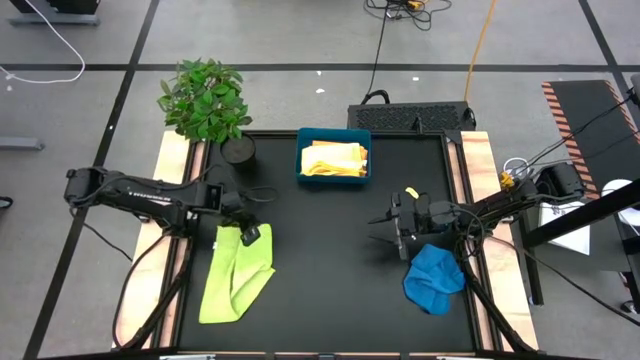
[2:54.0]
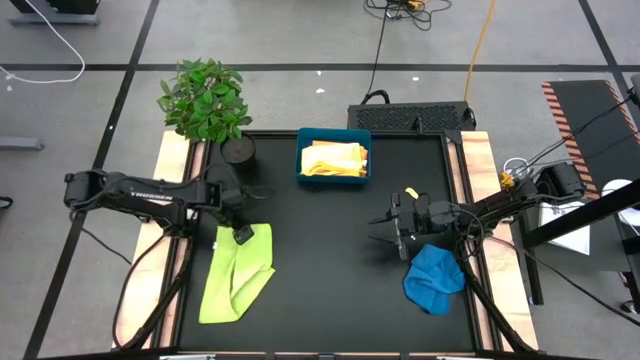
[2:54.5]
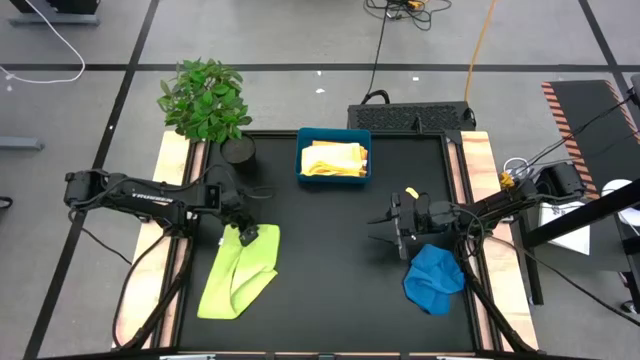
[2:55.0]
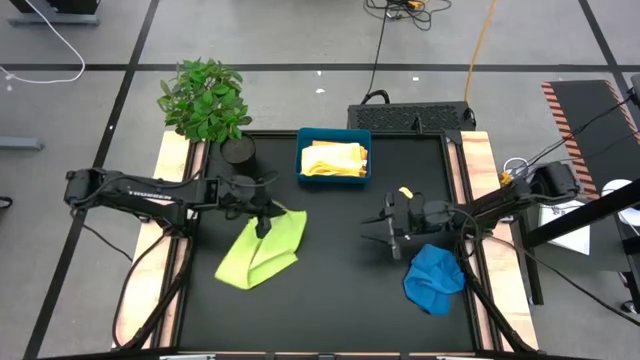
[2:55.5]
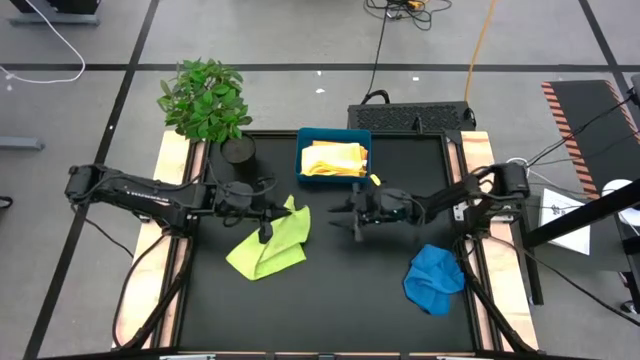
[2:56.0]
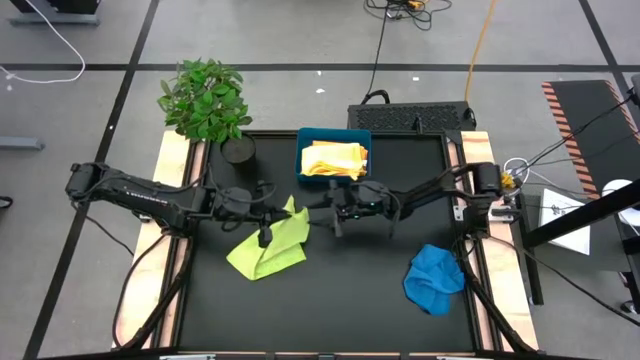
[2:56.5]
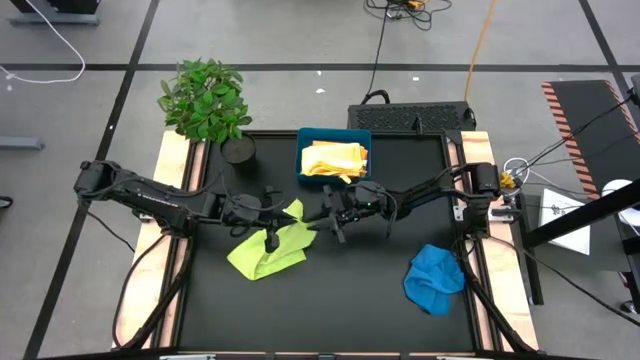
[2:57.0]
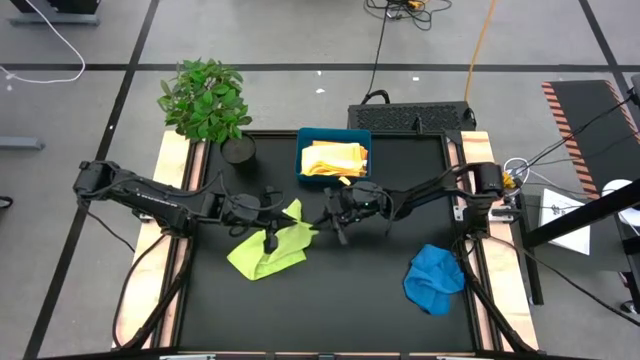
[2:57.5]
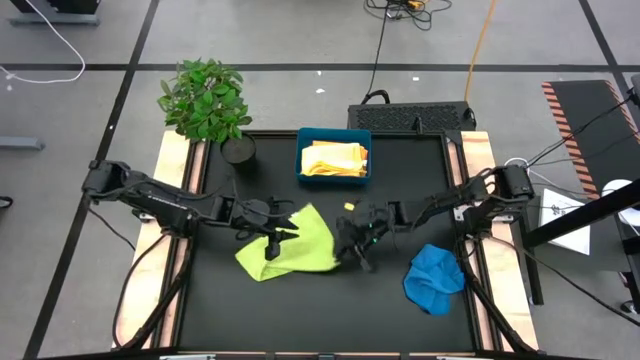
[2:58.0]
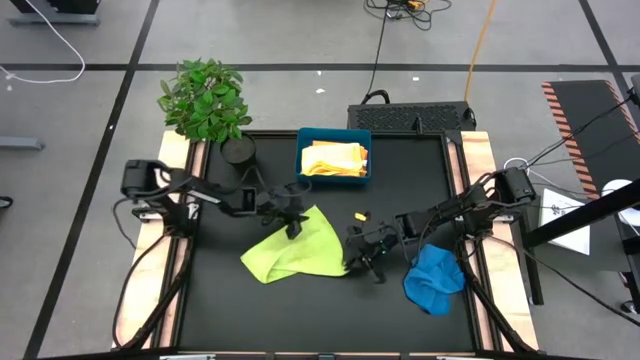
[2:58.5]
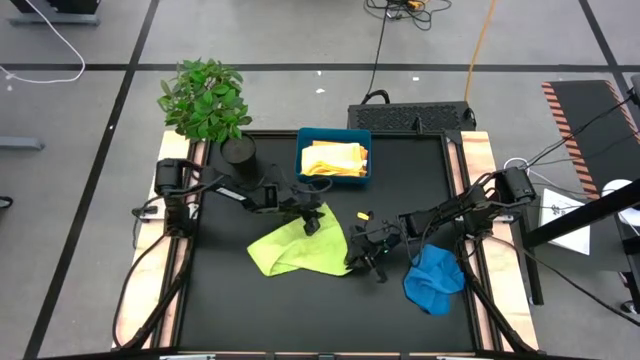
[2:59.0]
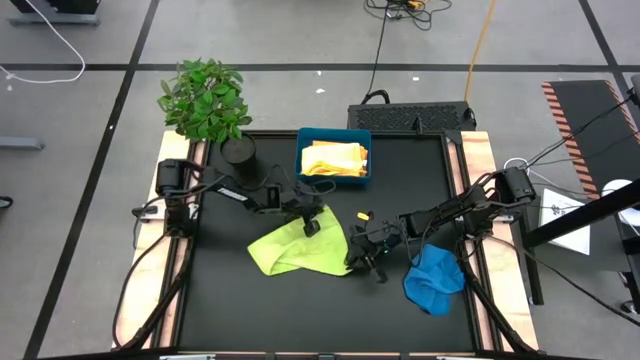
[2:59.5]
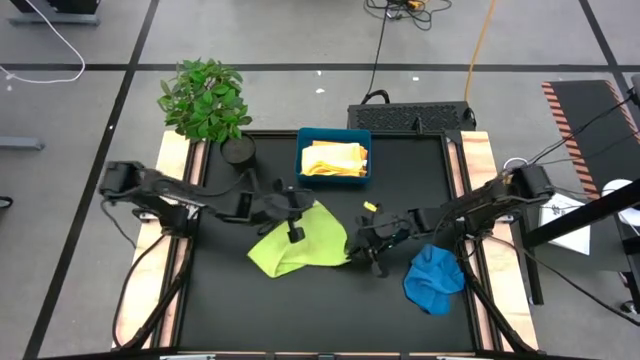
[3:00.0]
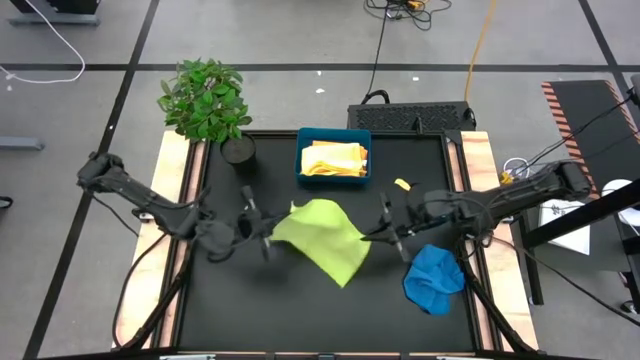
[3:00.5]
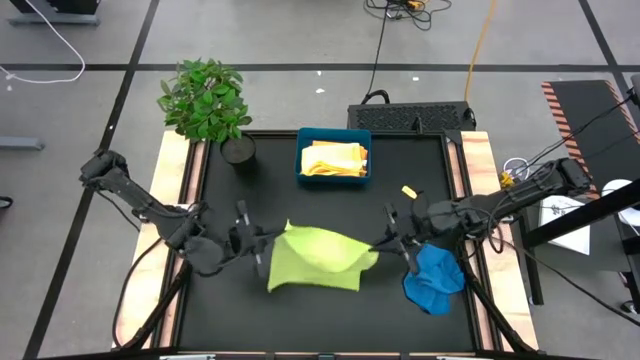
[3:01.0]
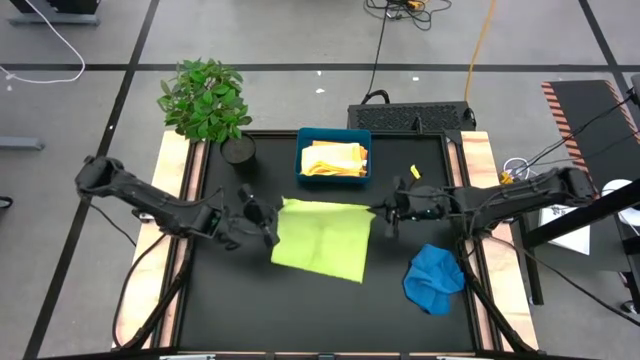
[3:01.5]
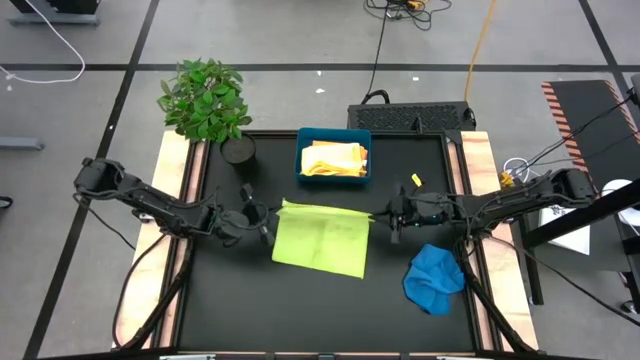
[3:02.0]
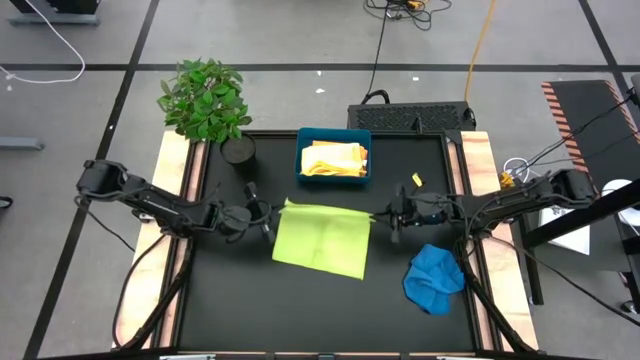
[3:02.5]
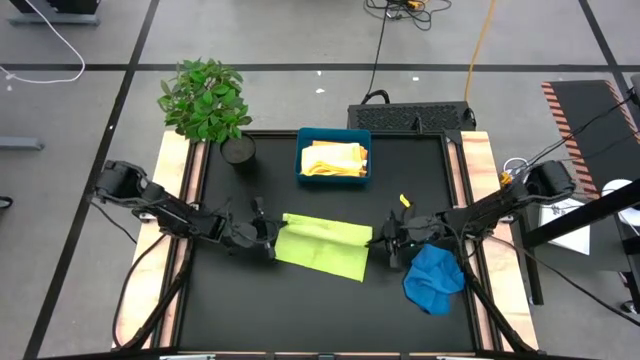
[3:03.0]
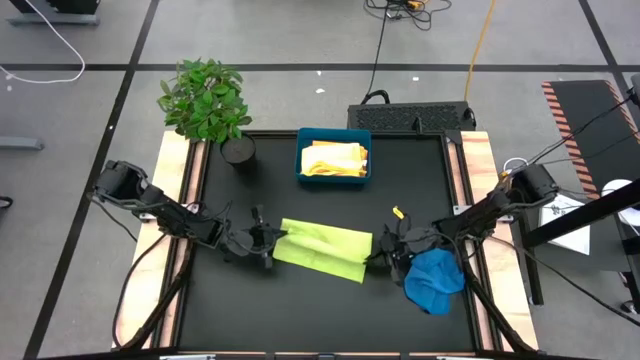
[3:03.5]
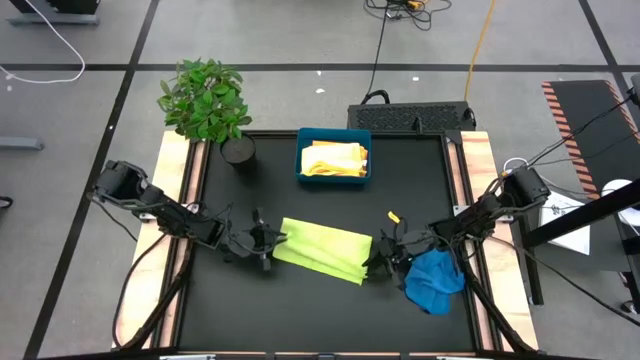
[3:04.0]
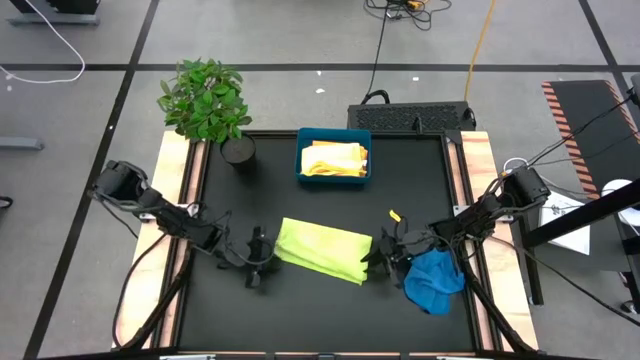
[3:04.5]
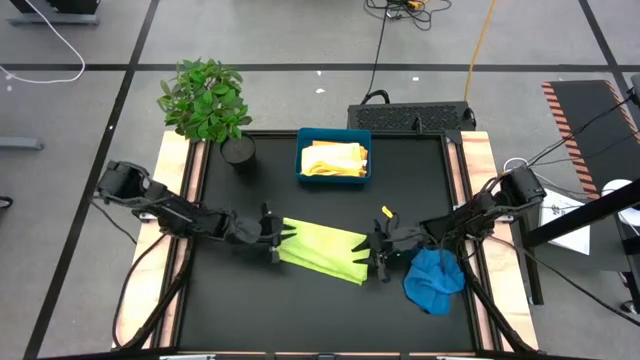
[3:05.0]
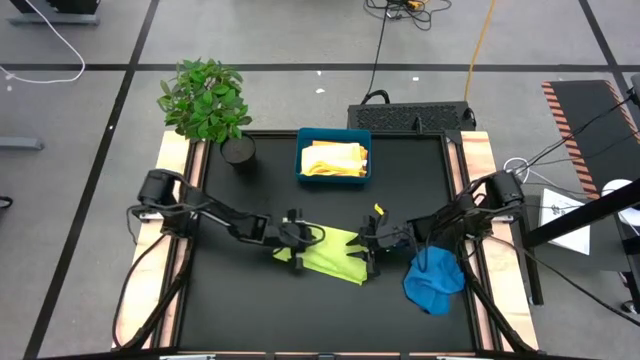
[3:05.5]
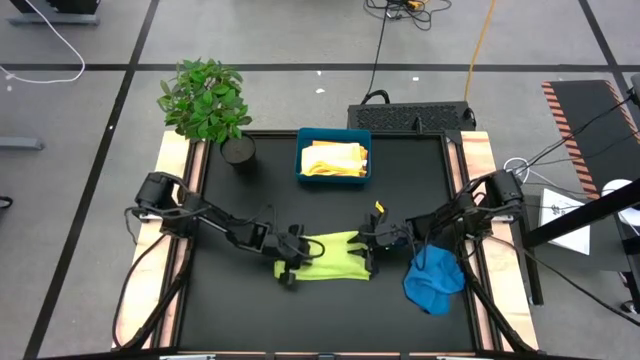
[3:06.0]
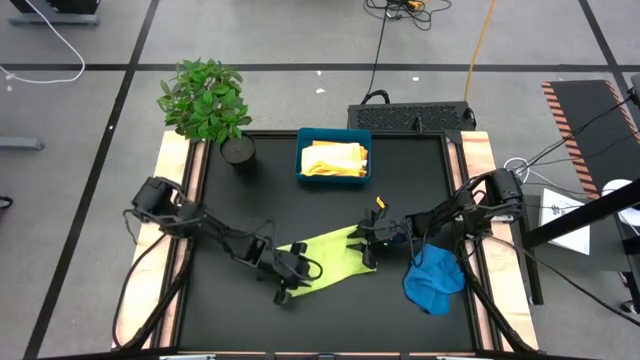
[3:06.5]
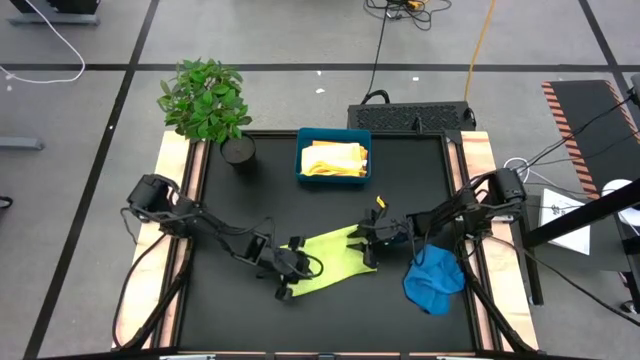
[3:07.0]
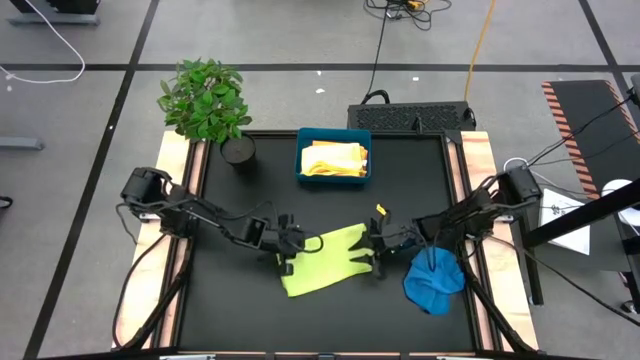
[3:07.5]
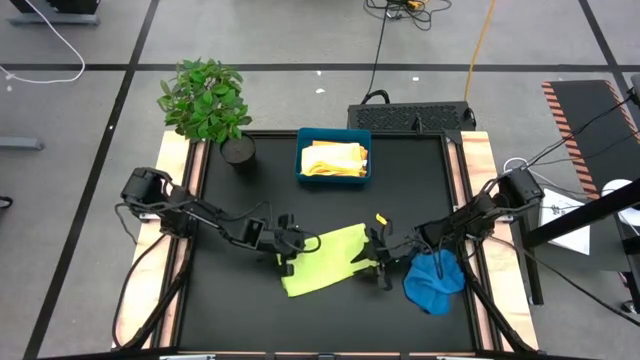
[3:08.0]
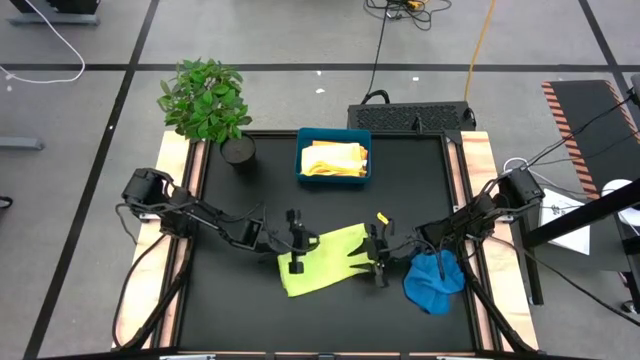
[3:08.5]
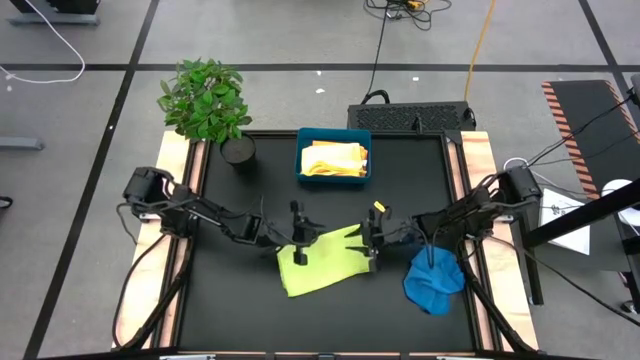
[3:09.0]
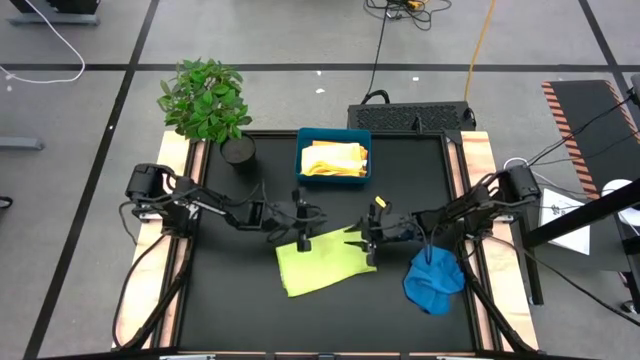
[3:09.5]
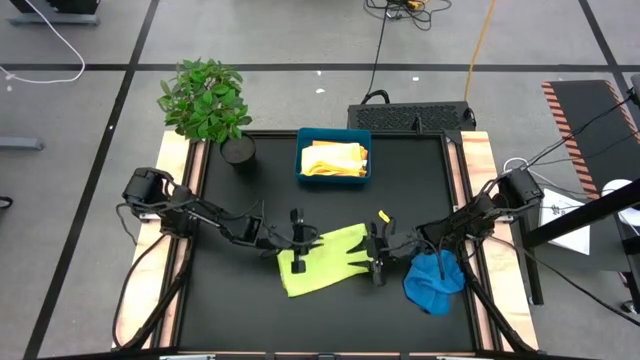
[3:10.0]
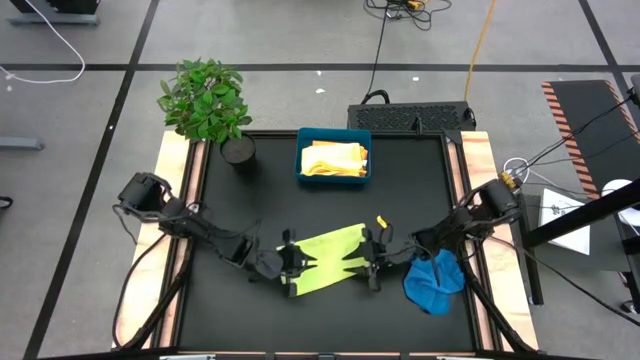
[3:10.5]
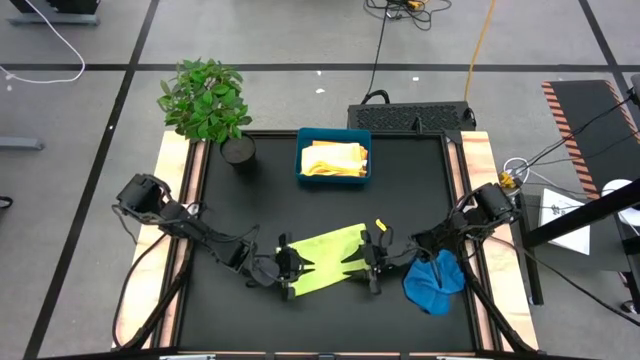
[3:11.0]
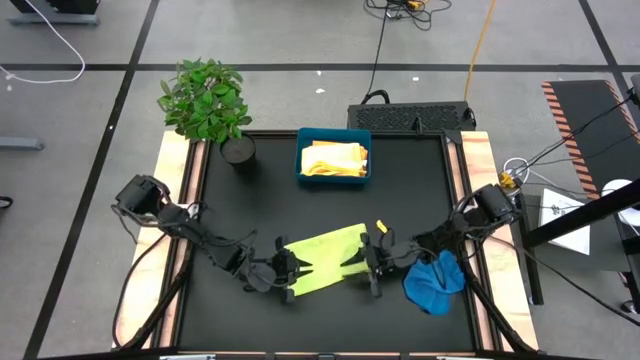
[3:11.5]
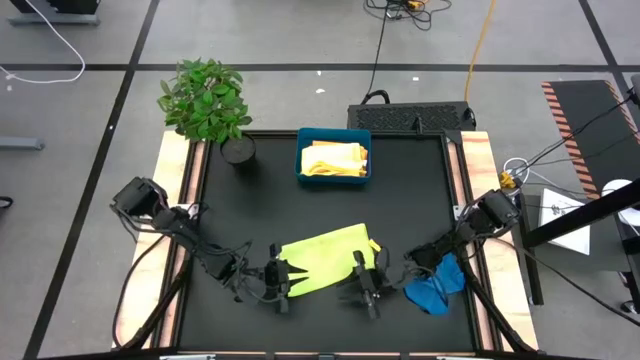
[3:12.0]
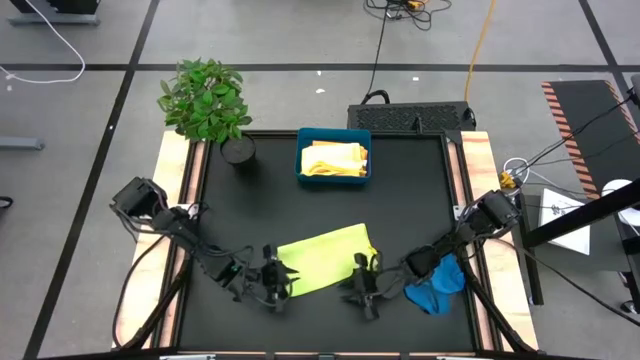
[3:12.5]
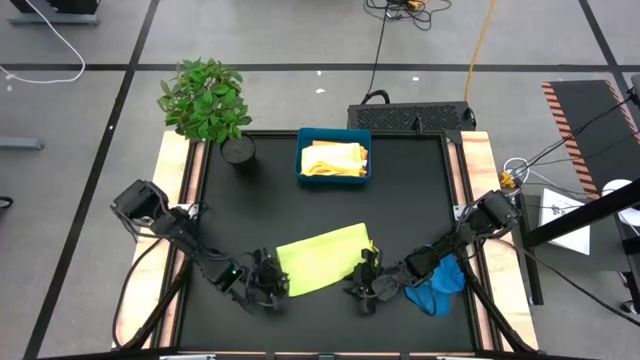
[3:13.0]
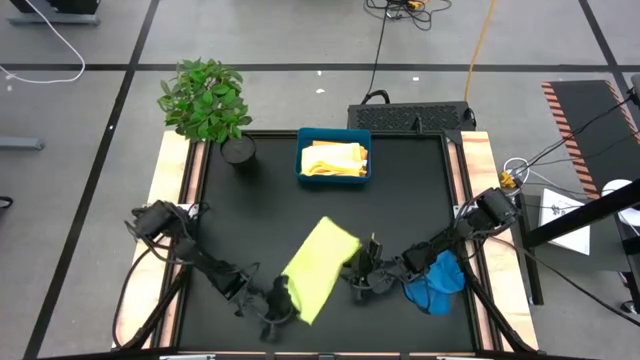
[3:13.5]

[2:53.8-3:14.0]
Task: Fold microfiber towels
Fold the green microfiber towel

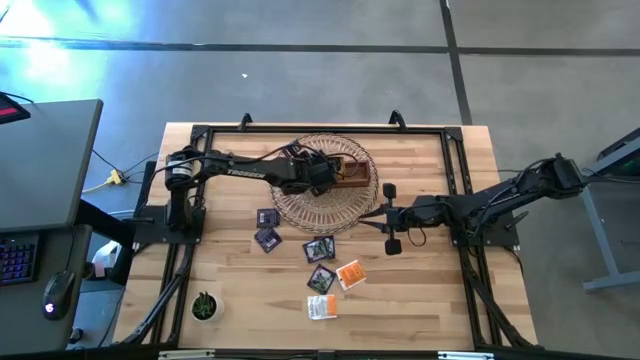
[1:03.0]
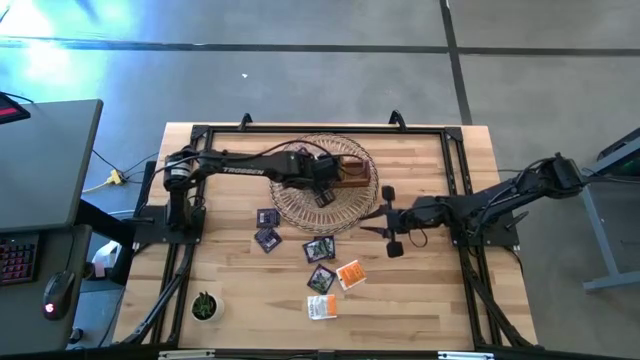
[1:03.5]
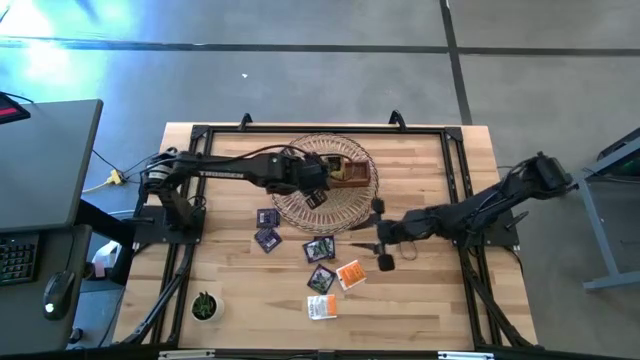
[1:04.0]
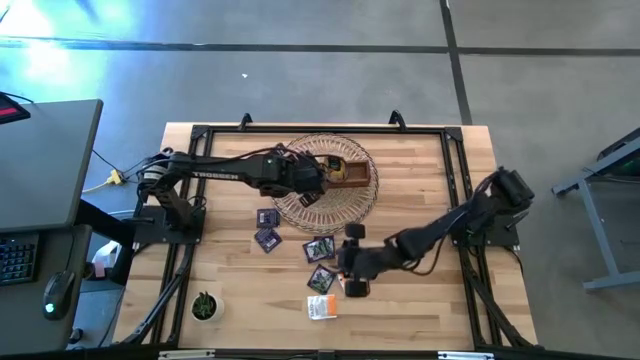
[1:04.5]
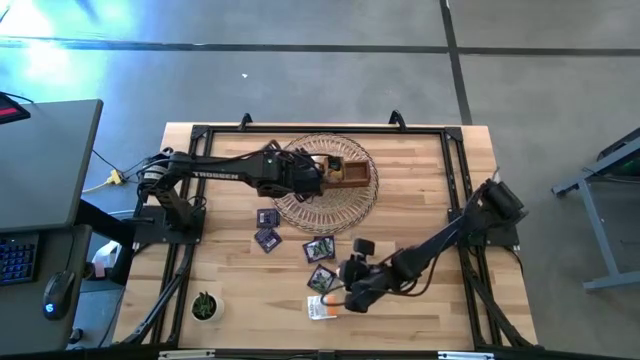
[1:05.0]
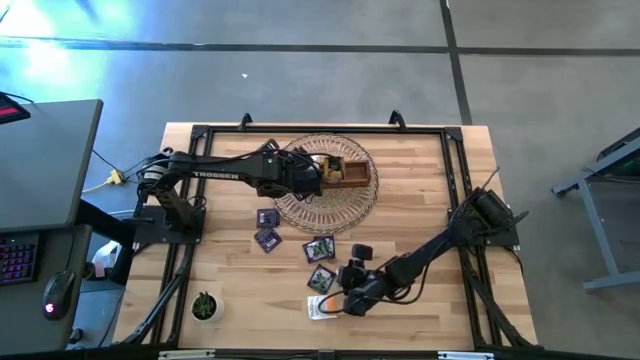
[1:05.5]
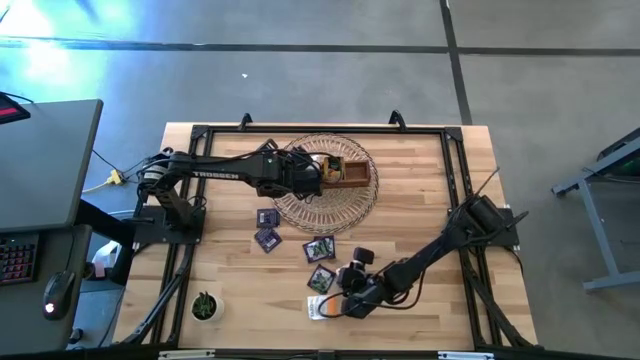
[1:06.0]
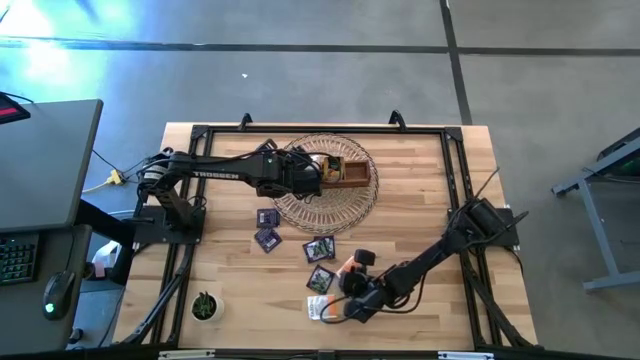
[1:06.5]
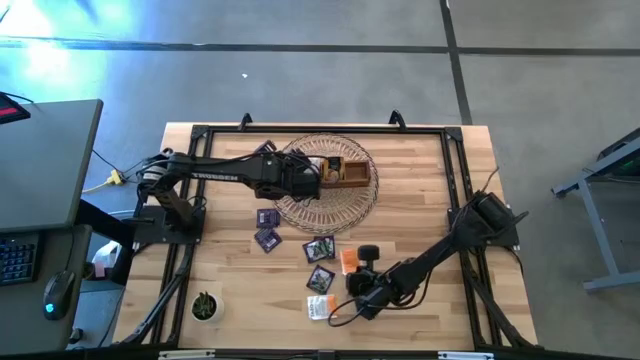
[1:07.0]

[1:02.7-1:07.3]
Task: Pick & Place Tea
Put the white tea bag into the left section of the wooden organizer
